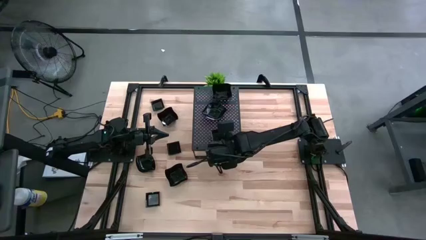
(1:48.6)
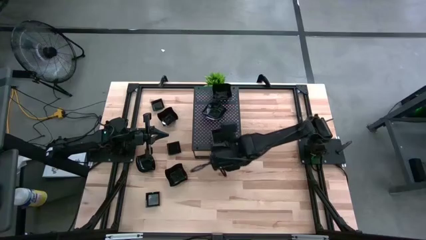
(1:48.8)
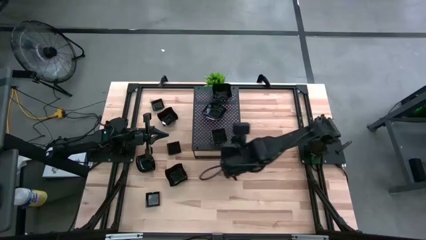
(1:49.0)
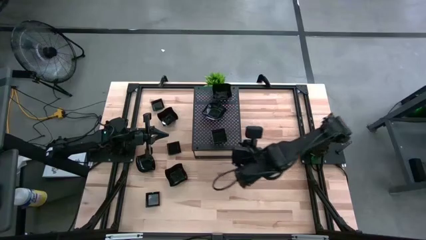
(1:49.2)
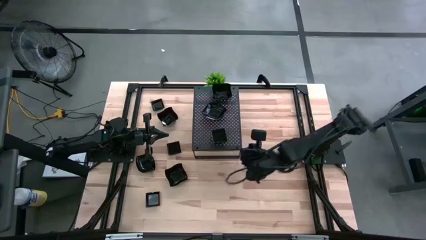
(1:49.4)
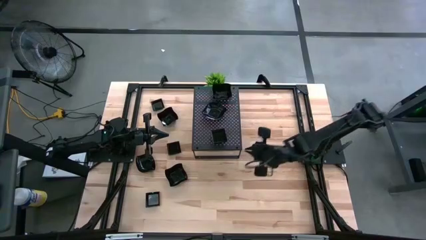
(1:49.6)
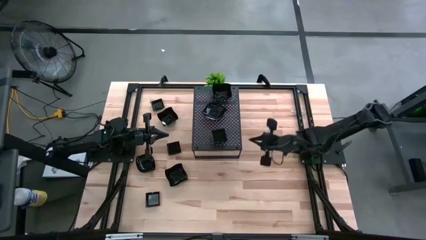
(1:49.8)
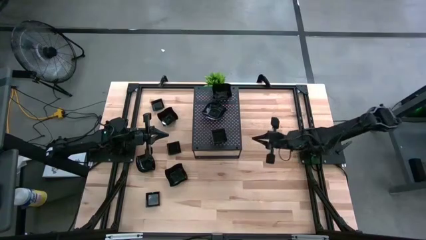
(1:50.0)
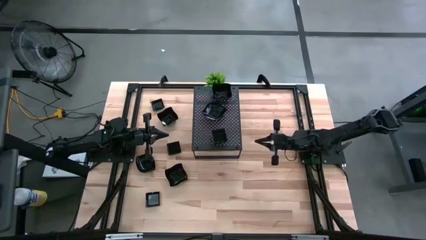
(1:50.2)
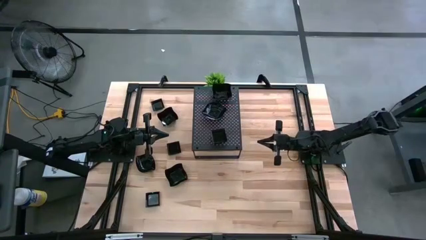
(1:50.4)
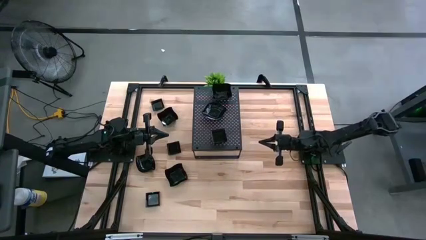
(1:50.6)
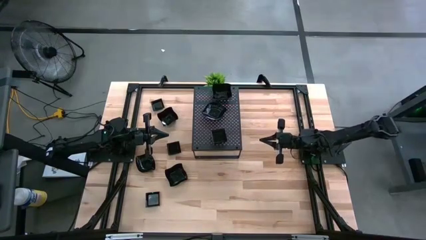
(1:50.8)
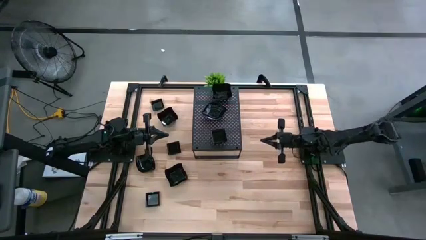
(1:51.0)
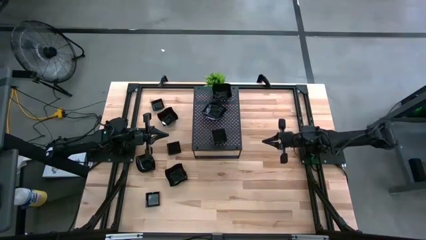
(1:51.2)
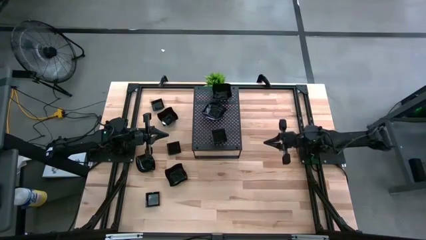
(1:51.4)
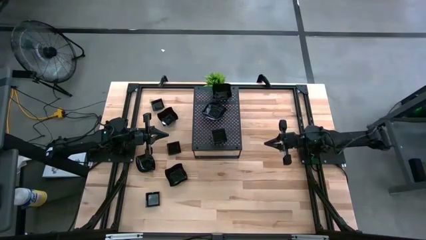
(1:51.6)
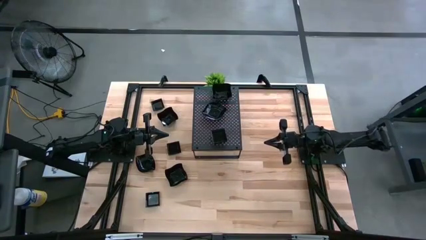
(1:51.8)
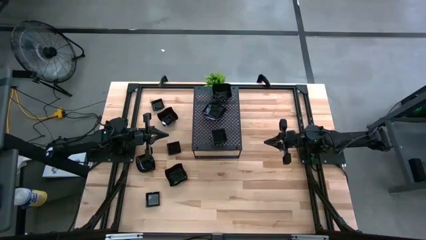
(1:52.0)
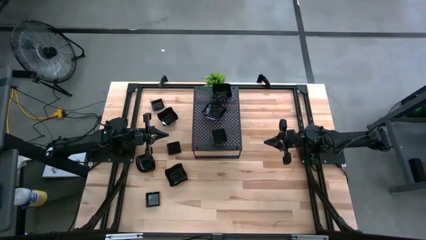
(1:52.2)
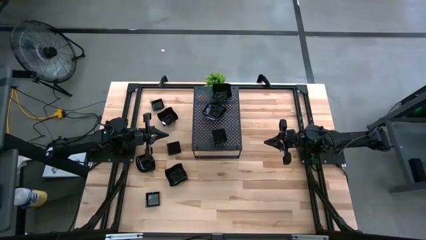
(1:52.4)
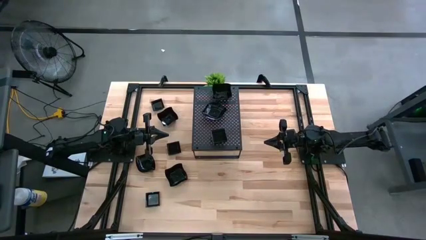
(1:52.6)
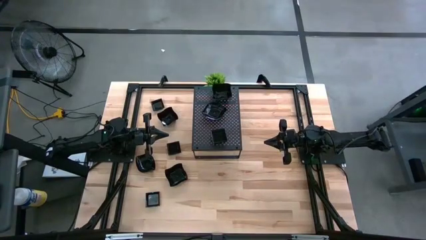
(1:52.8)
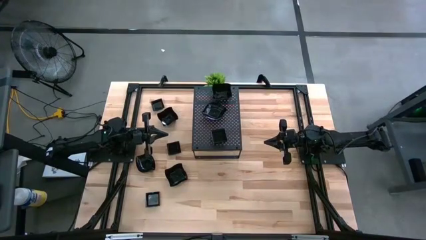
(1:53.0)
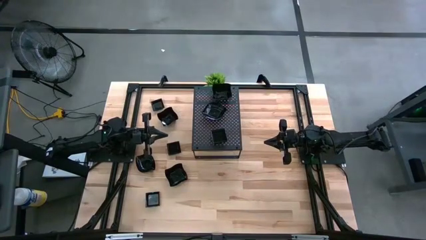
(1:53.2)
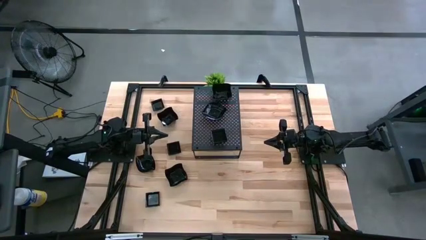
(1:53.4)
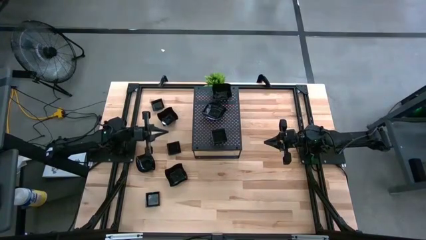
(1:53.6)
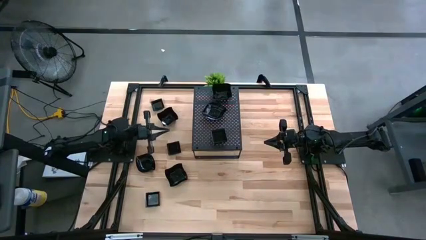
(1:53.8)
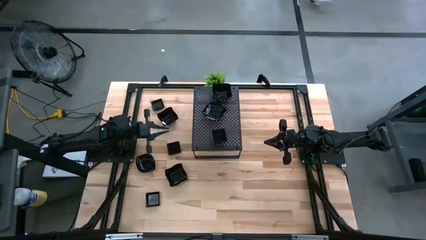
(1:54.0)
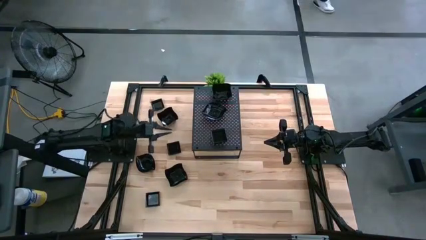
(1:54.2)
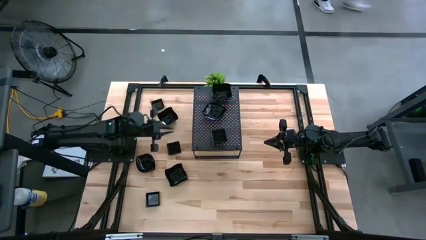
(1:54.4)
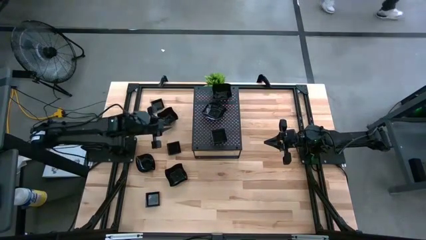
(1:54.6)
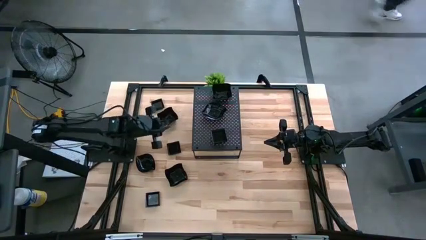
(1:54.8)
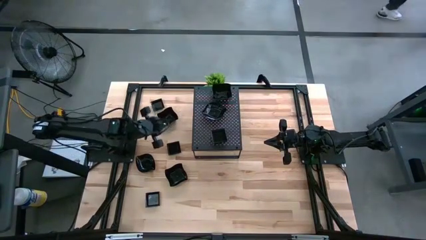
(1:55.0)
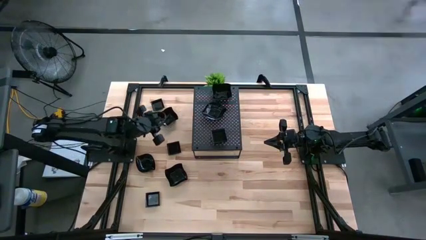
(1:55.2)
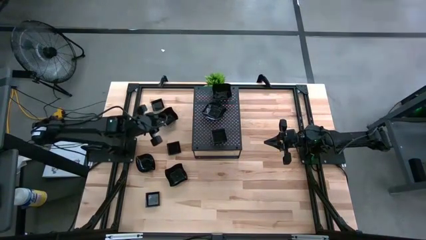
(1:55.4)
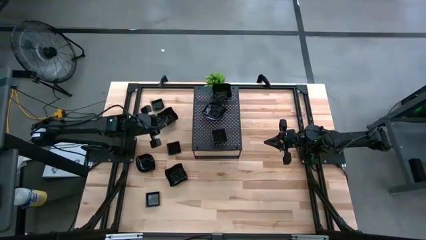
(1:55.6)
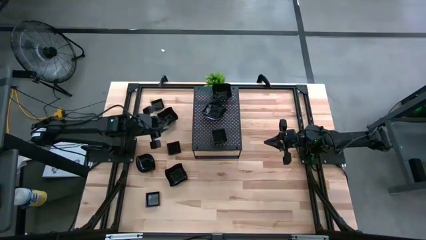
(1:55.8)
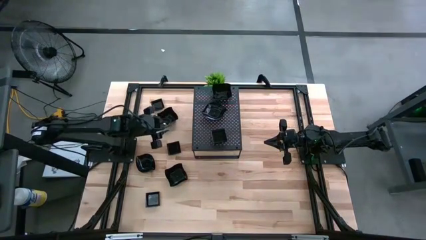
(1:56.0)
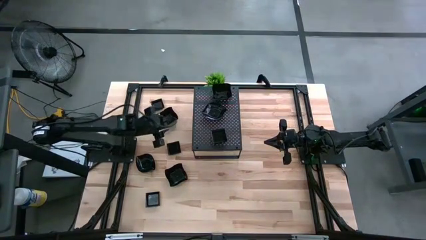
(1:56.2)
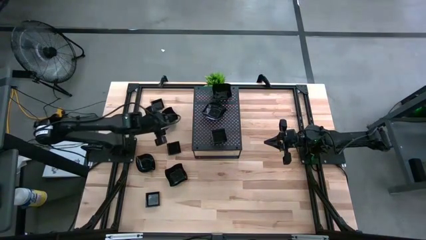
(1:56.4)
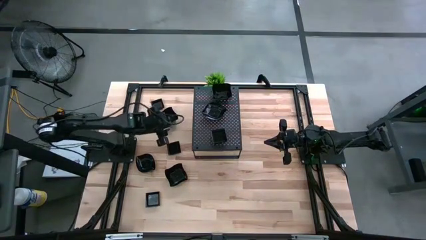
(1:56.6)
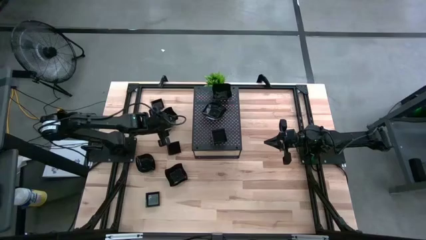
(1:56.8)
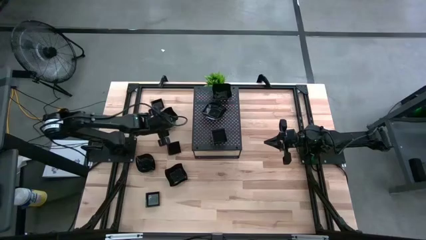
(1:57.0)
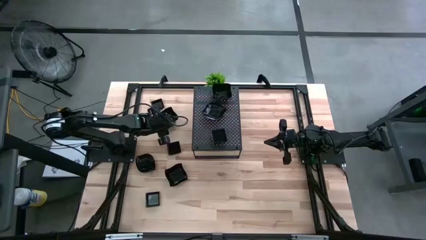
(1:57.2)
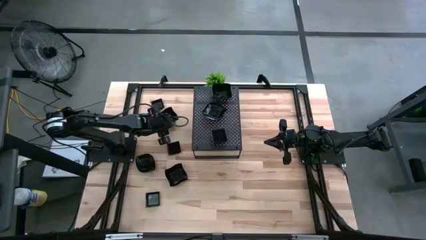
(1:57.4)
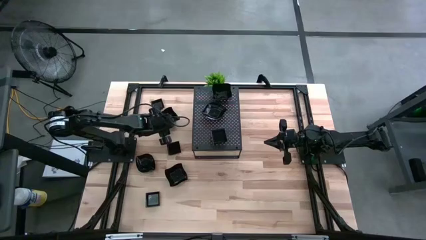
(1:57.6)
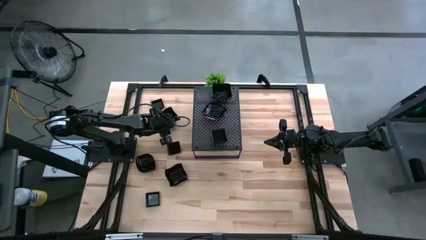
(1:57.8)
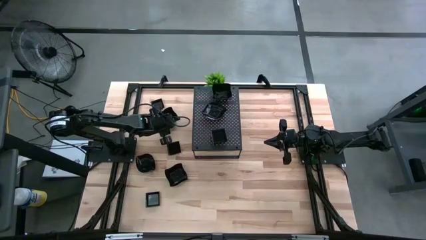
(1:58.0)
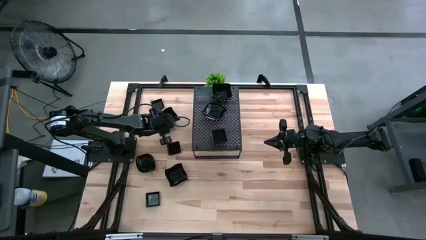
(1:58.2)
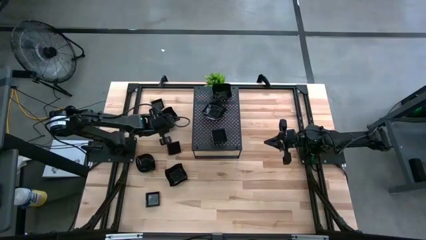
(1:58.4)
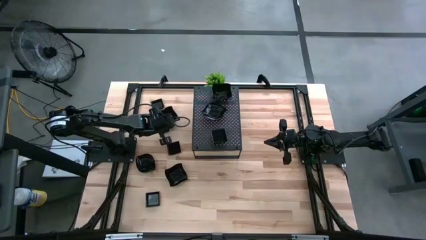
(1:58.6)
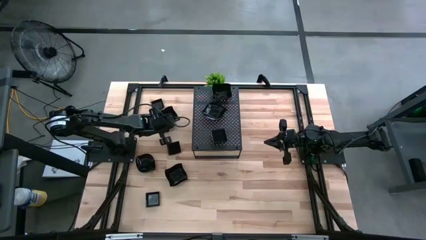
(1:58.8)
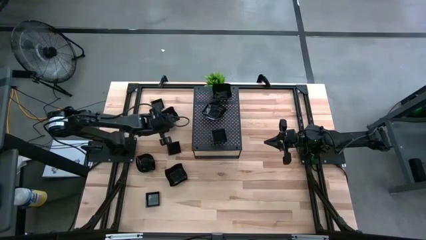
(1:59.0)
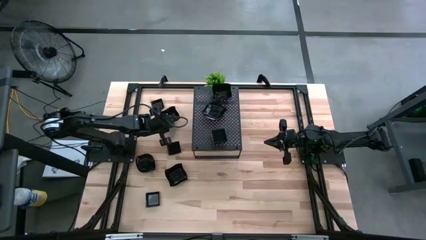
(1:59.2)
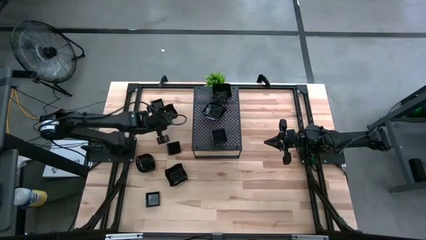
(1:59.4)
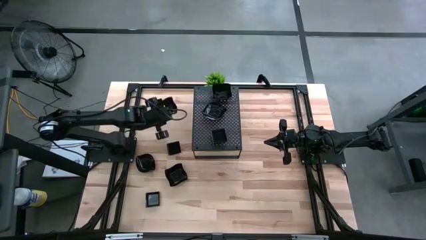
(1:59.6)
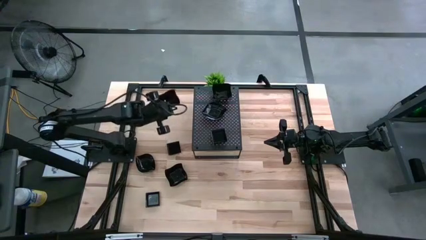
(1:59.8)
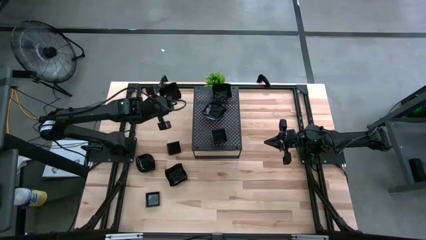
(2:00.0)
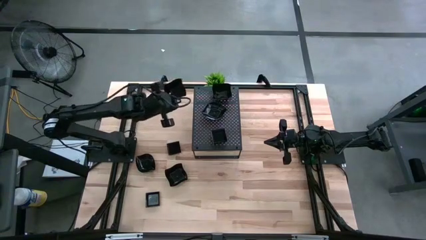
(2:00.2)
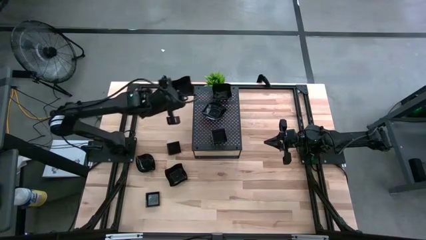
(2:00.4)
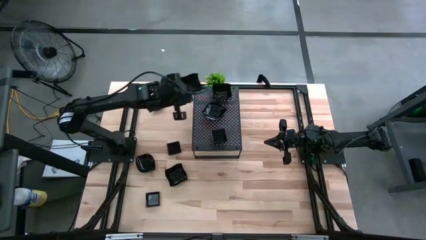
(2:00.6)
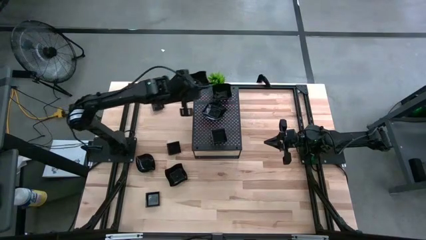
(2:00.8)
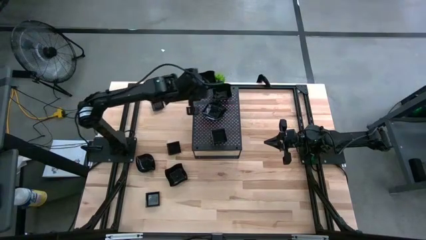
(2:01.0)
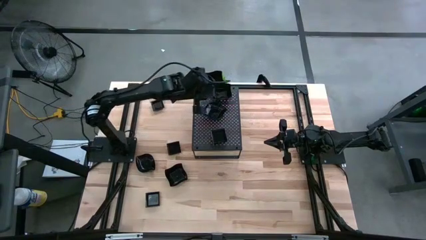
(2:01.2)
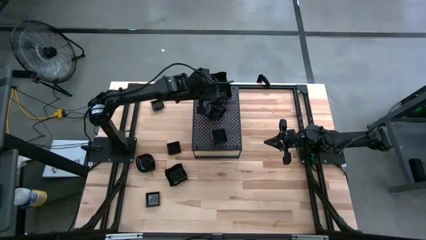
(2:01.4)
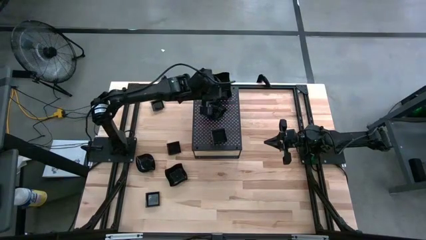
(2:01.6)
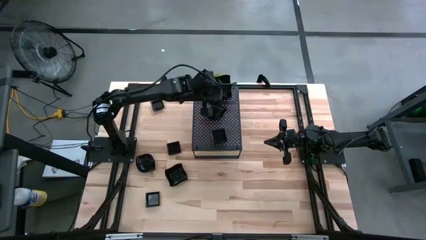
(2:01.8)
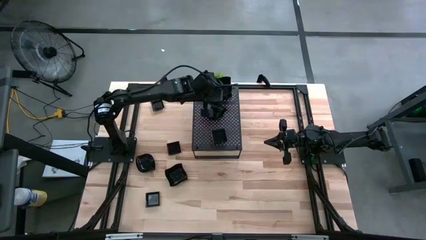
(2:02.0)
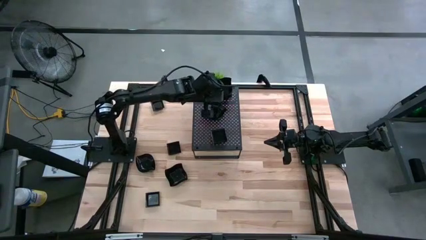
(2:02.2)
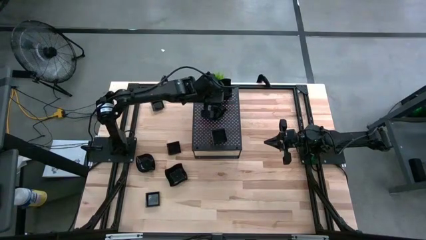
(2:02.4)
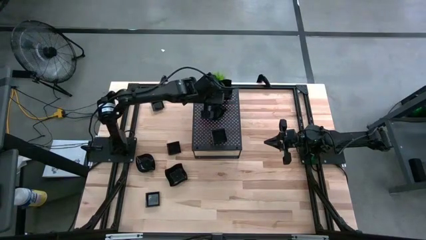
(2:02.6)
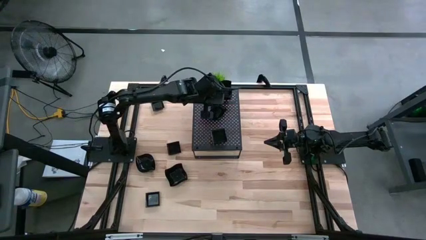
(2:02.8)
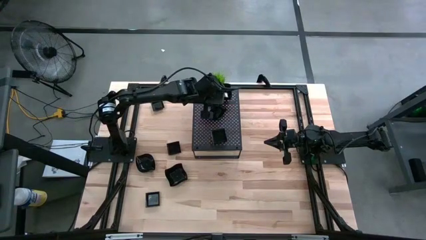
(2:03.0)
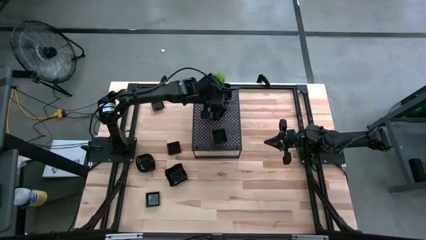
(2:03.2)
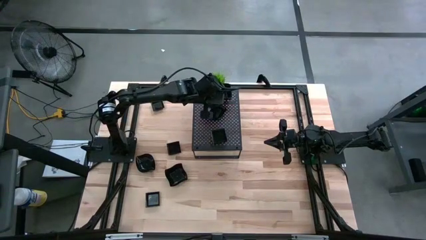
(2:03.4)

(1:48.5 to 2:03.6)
Task: Pick & Place Mini shaped plates
Stack the distorted square plate on top of the distorted square plate on the shelf

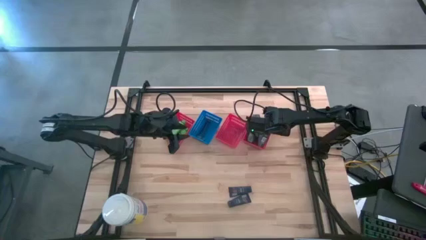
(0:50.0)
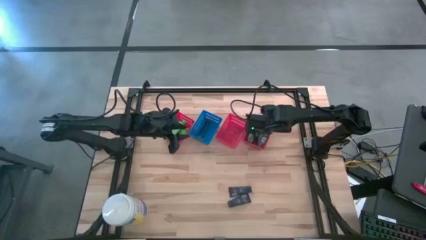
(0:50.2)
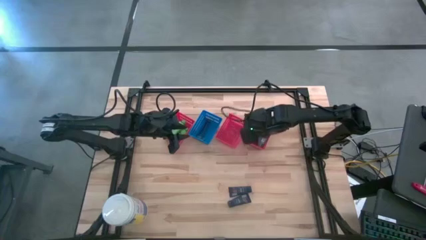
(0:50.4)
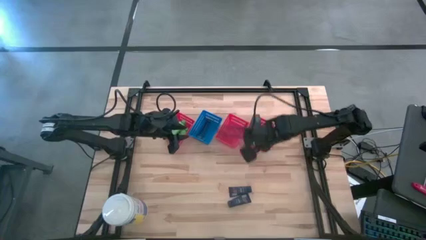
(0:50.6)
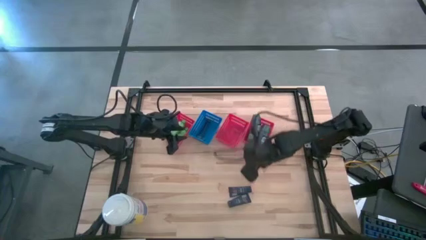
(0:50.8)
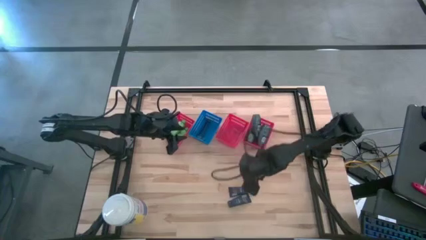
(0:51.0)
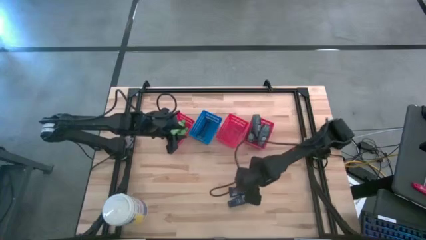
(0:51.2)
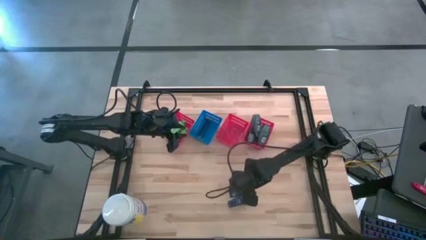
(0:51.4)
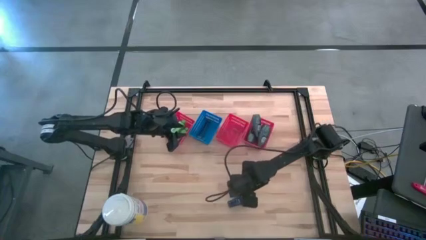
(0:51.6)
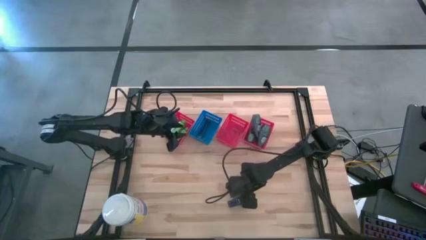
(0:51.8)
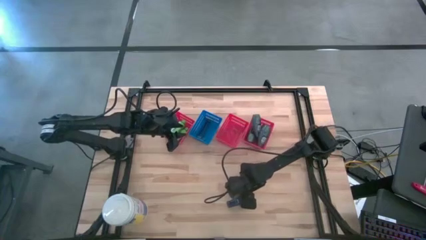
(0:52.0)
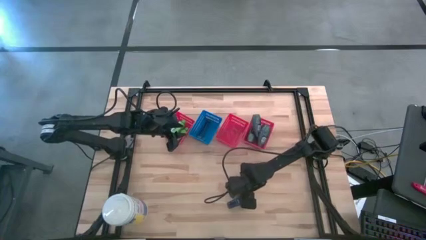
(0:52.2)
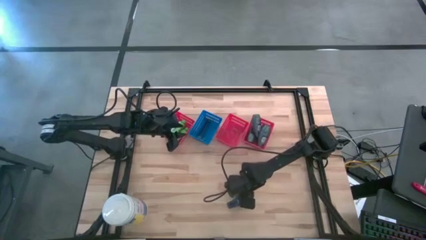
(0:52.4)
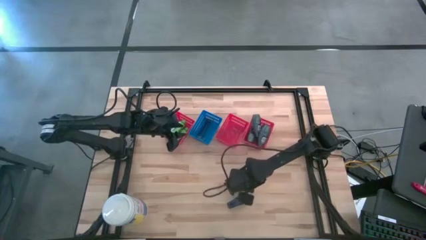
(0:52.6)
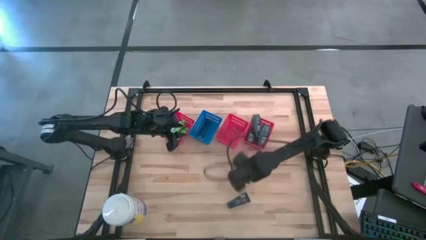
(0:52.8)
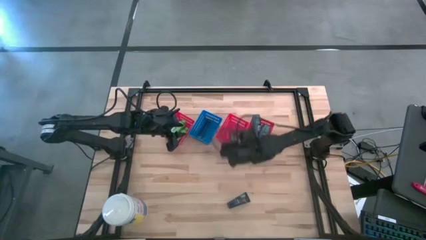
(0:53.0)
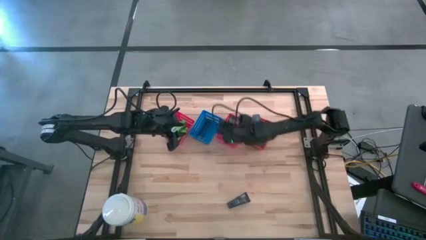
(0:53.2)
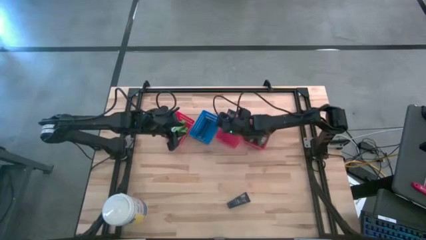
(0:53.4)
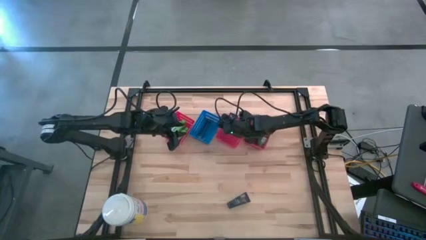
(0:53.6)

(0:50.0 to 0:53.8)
Task: Pick & Place Travel size toiletries
Put the blue shave cream into the middle red bin
